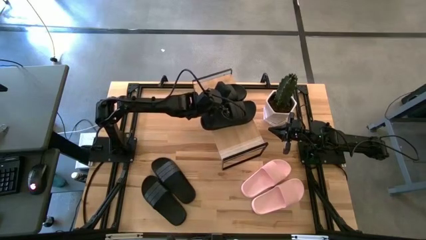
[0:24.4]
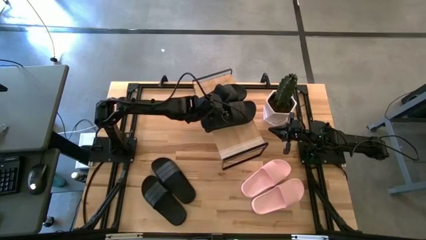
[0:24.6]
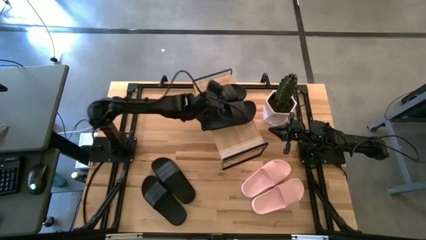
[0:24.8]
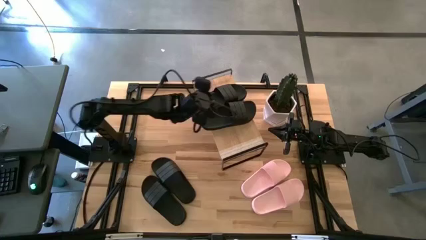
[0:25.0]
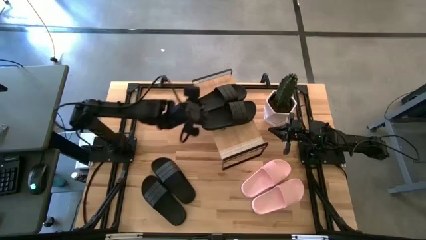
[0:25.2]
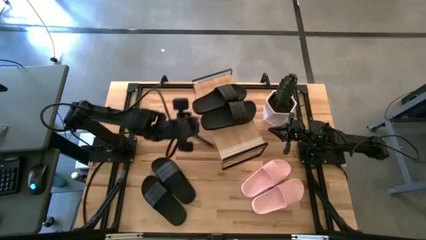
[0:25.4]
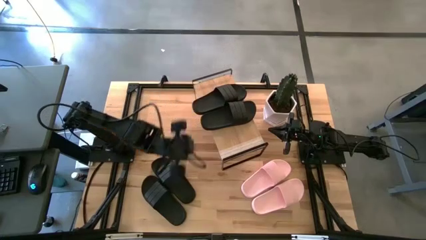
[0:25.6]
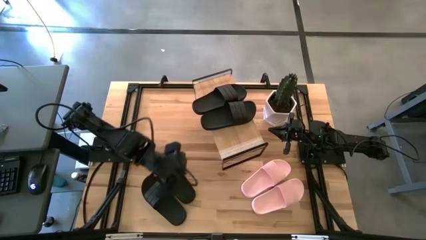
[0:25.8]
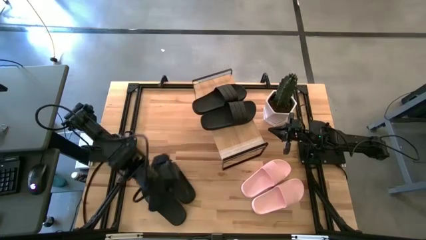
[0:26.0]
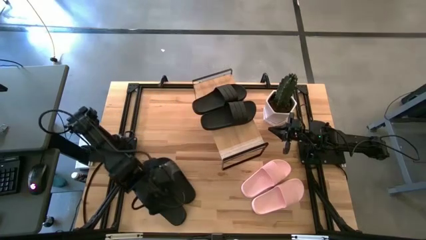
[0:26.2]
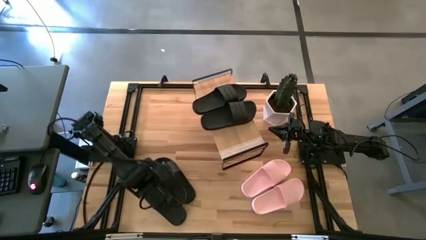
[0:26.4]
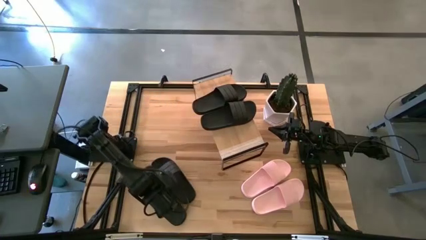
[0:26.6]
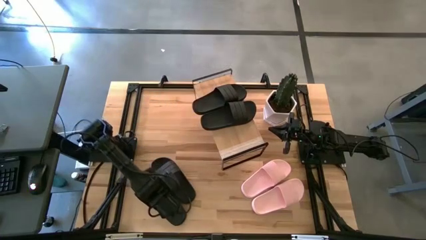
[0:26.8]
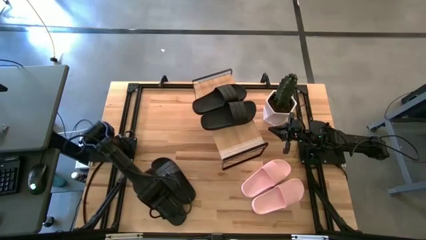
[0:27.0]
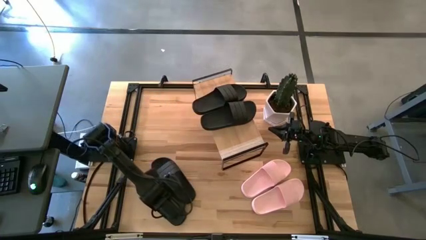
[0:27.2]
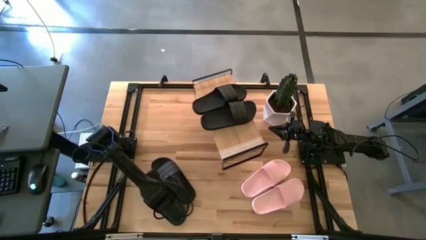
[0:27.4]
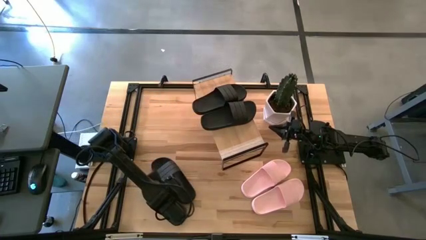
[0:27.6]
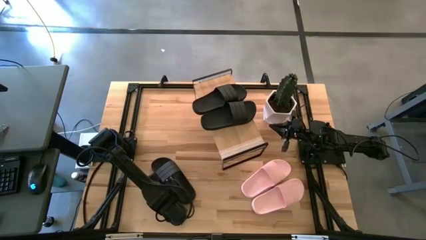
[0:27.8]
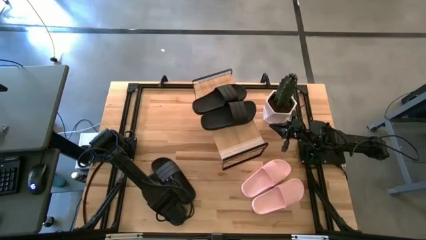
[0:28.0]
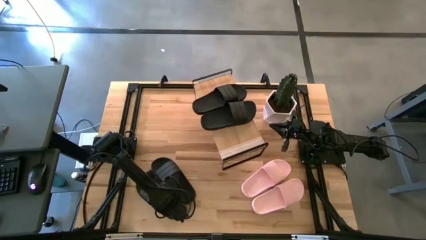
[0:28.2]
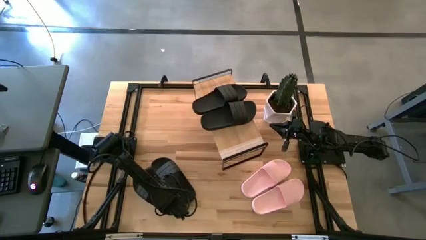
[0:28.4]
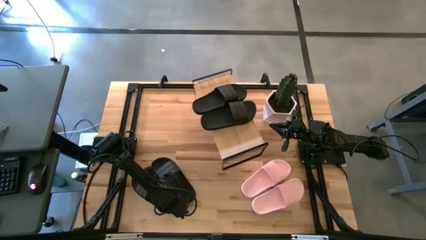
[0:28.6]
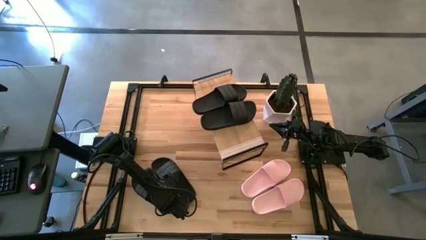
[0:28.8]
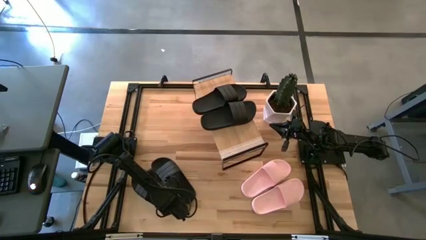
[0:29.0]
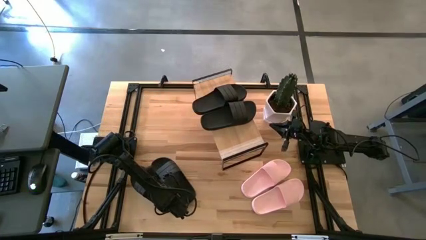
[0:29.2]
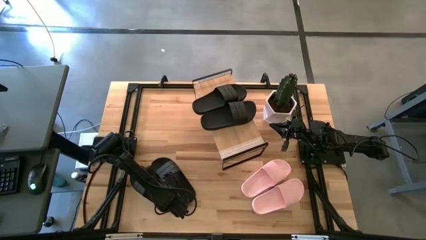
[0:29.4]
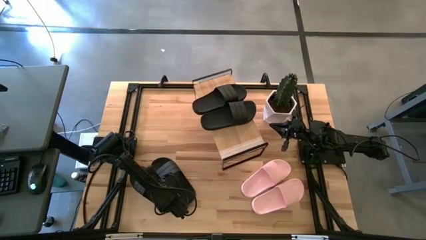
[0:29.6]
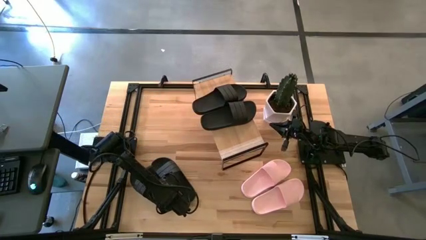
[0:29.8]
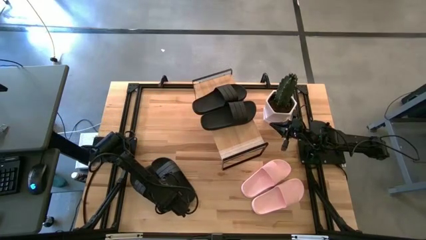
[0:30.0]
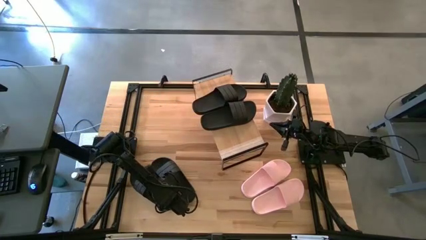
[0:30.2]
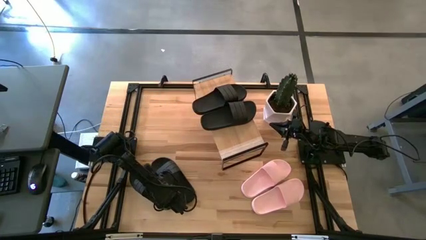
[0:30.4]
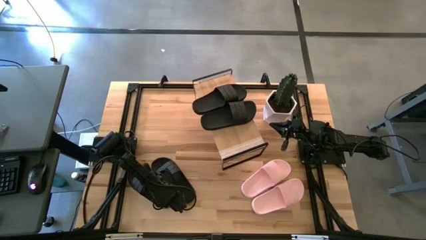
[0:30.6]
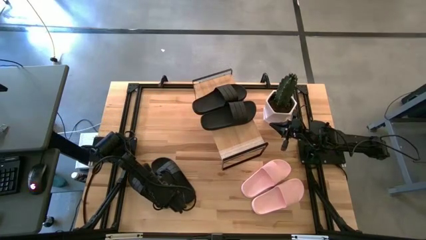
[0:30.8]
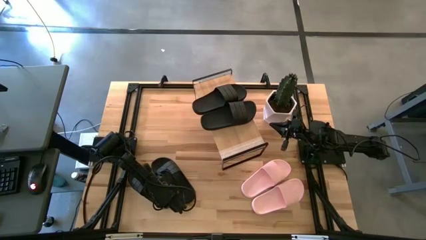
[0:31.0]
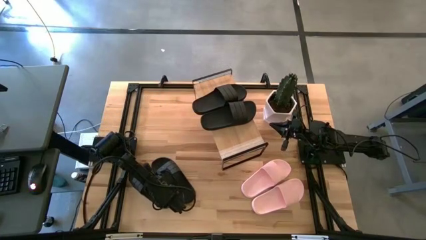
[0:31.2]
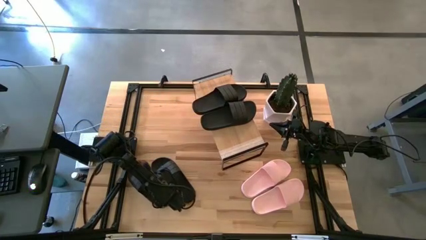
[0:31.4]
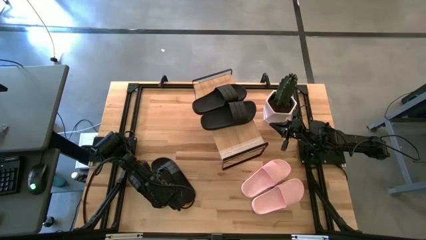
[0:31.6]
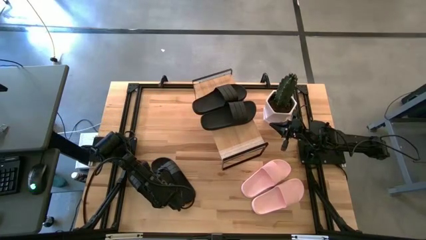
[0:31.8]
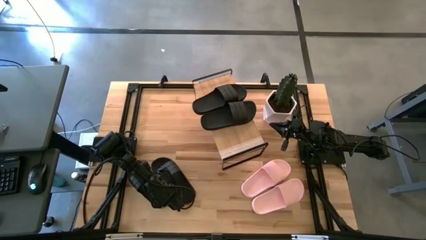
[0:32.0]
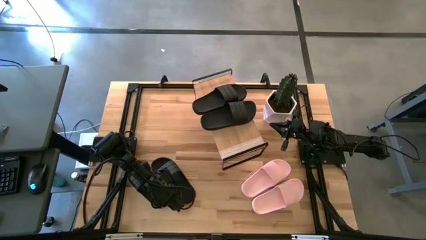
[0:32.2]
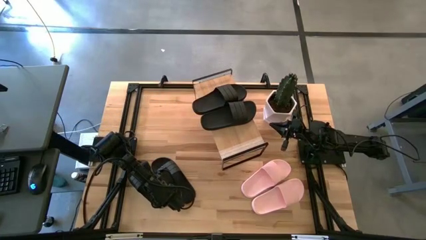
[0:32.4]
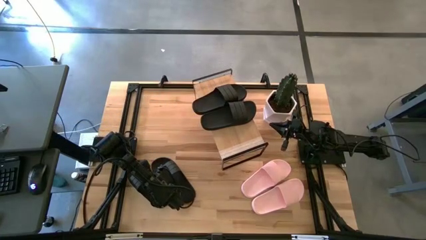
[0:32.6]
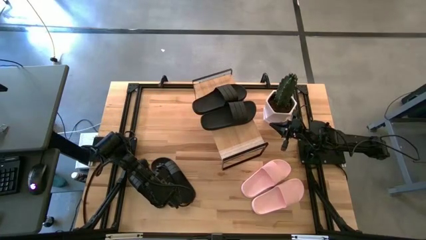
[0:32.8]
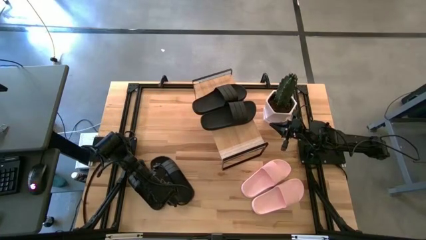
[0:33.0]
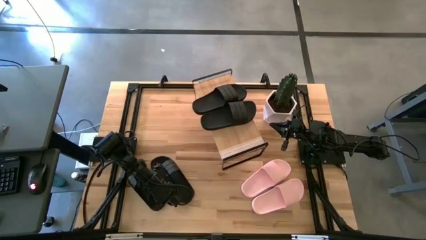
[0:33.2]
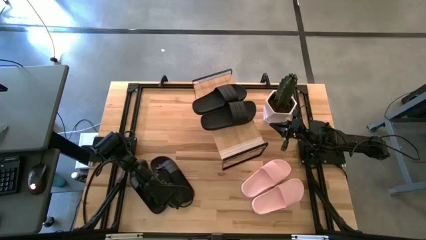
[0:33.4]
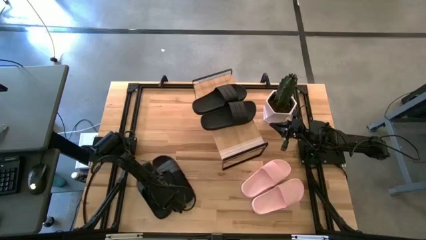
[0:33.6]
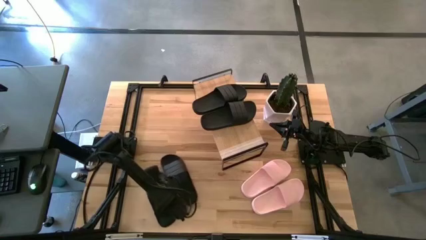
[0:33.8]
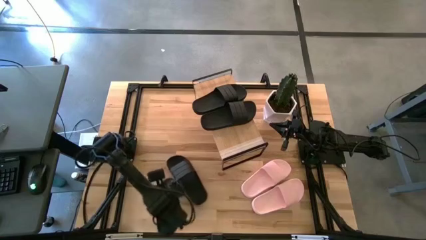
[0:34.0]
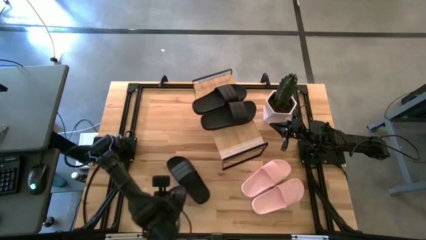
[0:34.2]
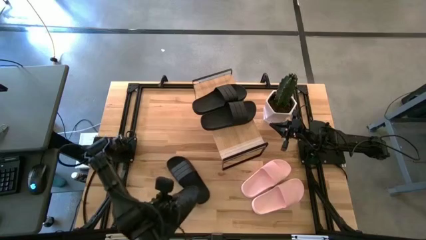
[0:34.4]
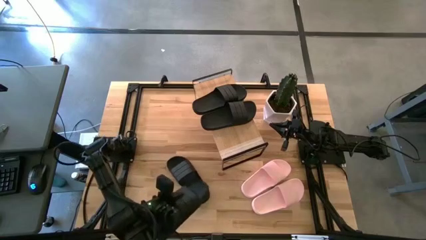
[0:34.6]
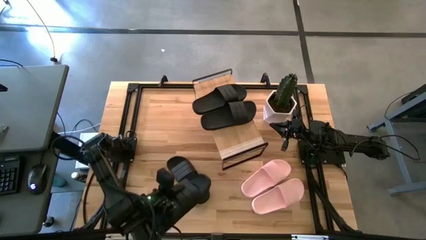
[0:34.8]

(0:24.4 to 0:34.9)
Task: Pick and place slides into the shelf
Put the black slide under the shelf

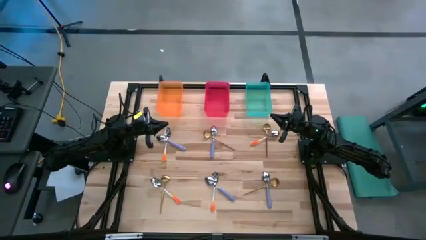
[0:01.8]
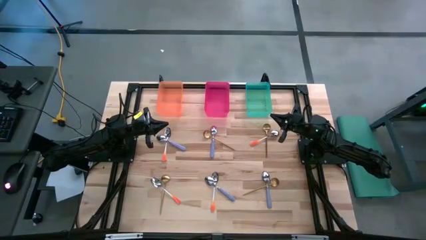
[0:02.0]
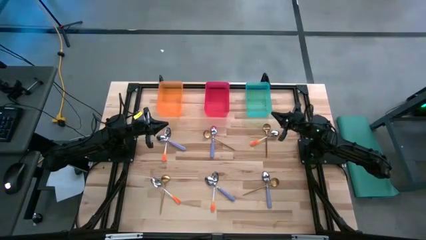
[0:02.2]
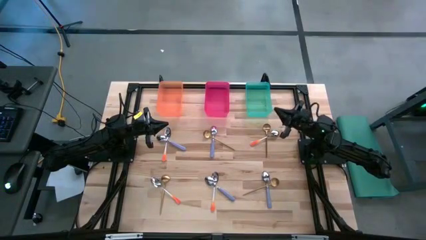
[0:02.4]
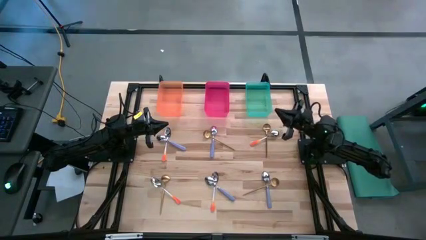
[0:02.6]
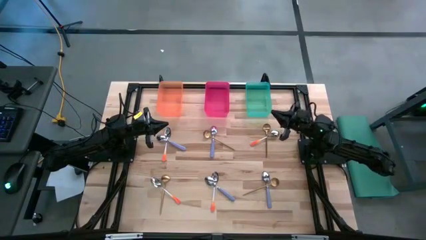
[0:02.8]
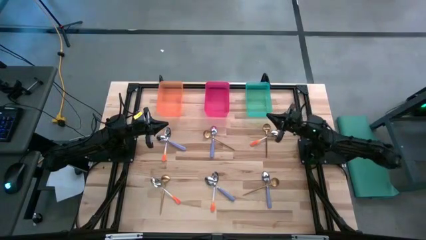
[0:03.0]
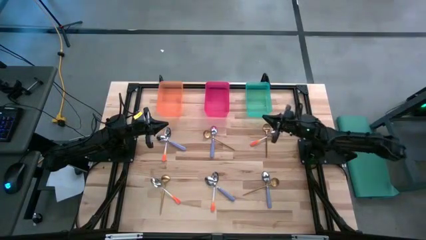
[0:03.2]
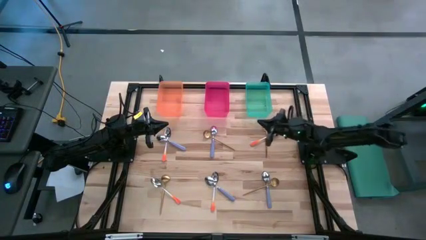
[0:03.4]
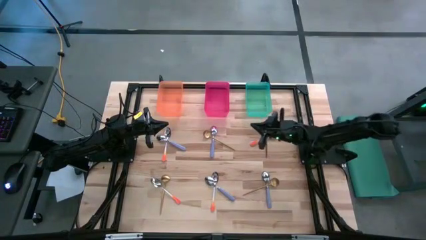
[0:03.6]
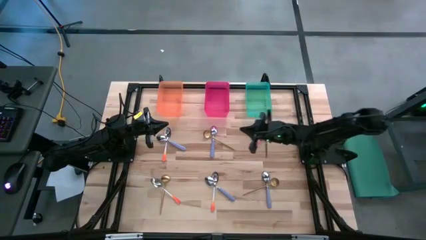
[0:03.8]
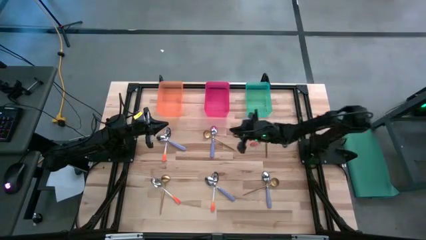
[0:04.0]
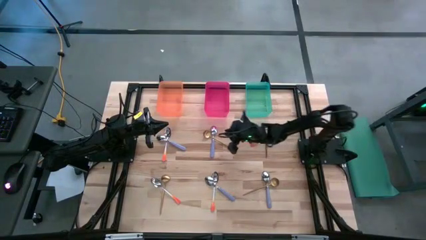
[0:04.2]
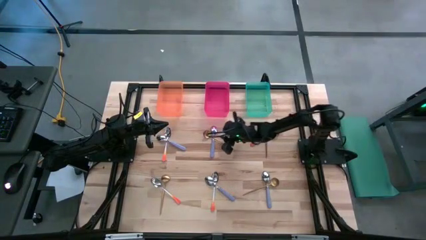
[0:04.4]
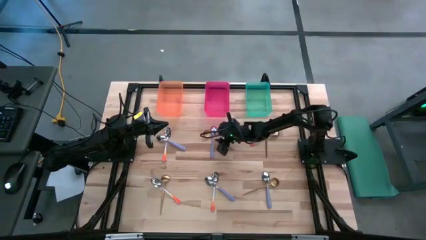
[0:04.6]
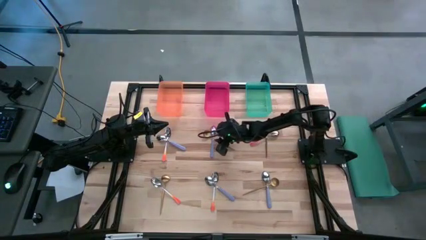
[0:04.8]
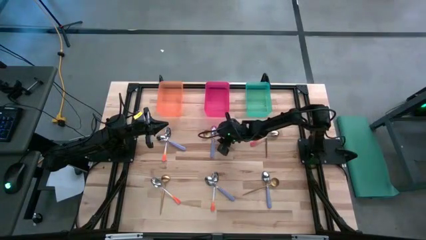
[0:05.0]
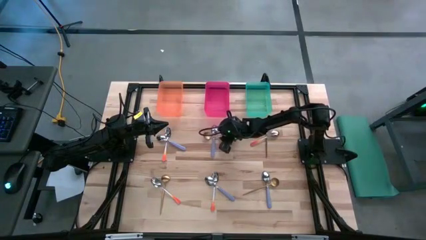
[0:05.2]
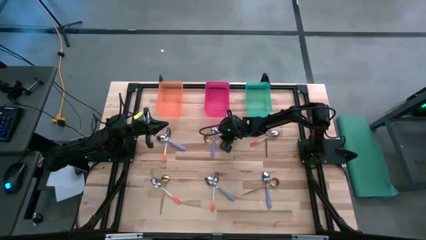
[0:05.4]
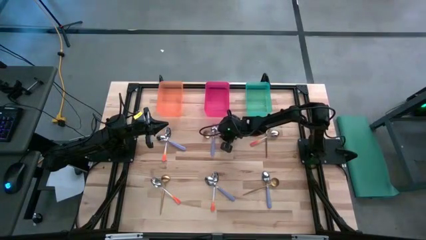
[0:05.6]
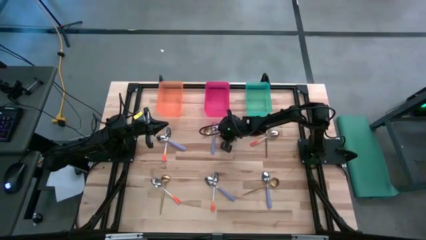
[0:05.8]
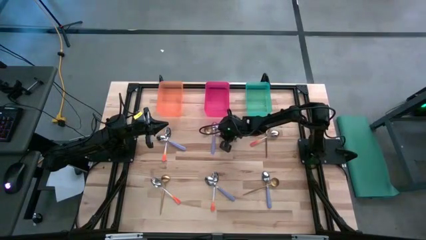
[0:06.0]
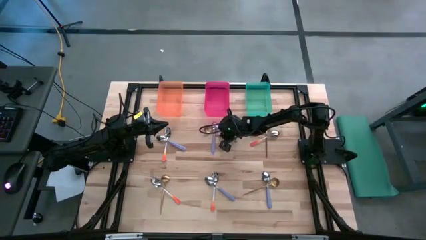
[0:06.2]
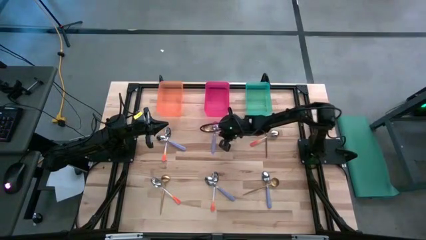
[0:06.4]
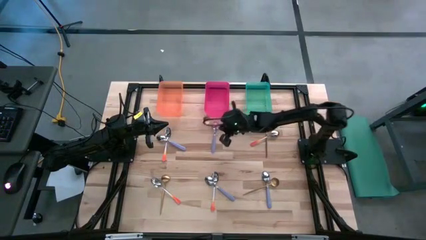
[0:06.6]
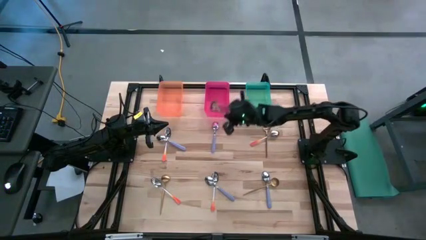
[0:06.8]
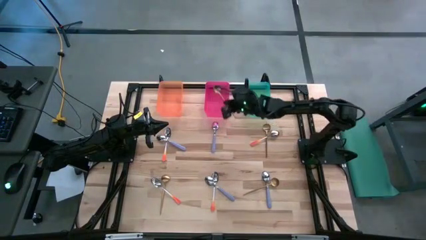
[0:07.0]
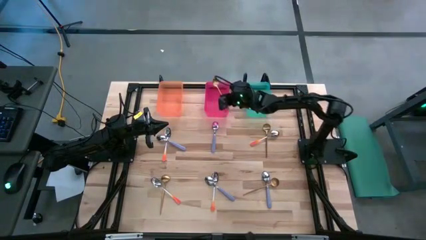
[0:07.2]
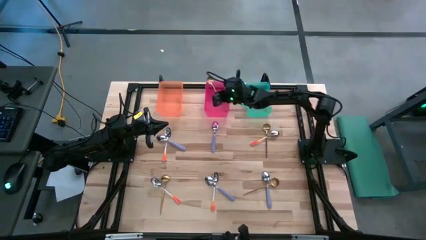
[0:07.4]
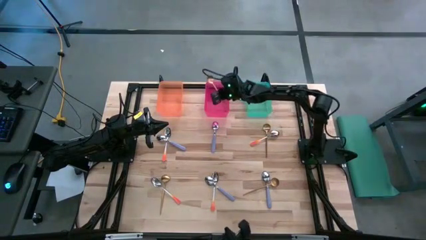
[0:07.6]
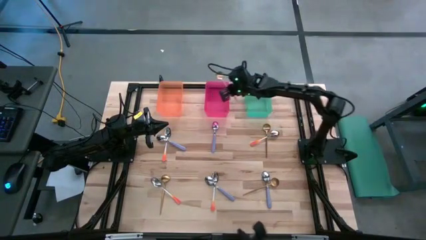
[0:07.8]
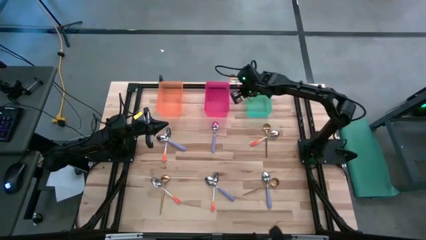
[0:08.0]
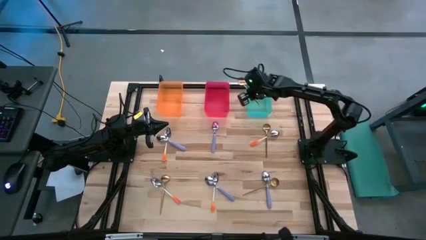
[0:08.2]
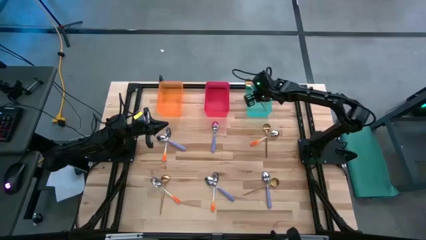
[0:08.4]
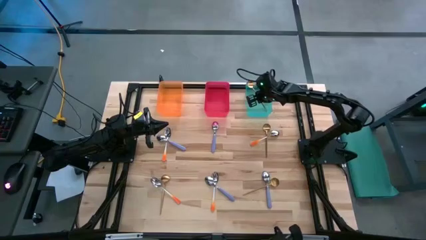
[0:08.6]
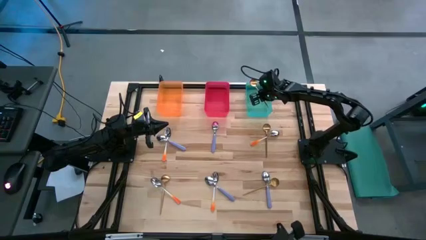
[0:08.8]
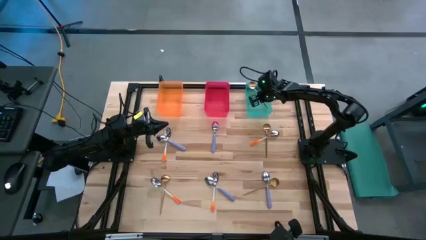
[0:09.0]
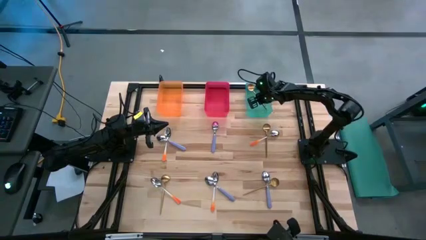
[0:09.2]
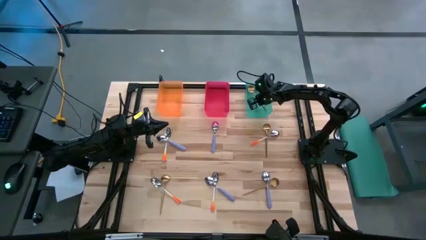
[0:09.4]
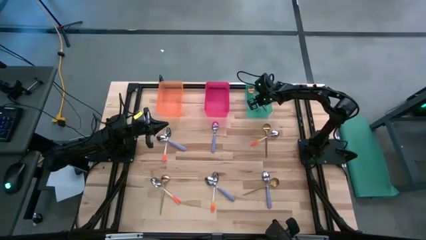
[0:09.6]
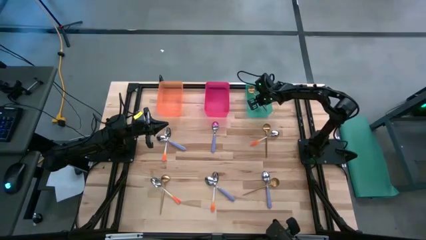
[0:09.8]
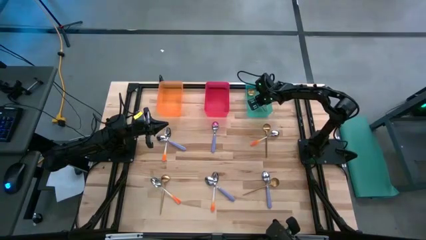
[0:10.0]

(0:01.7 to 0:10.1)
Task: Sort silverware by color (type)
Put the golden spoon into the green bin
